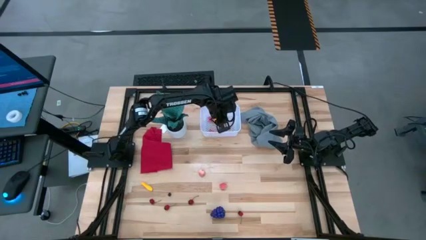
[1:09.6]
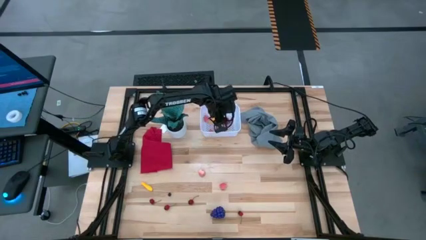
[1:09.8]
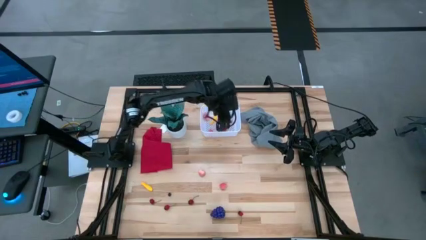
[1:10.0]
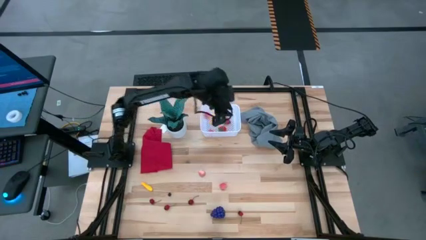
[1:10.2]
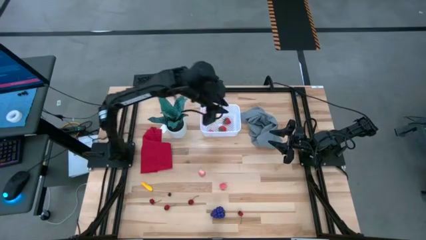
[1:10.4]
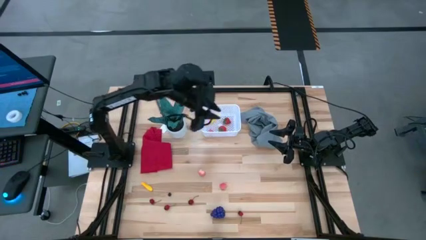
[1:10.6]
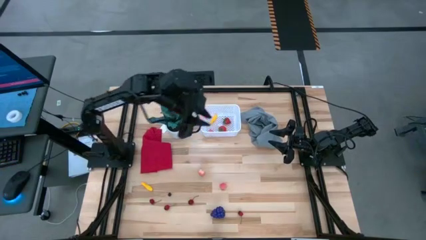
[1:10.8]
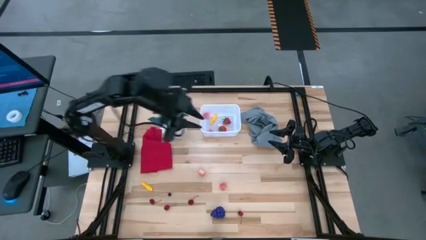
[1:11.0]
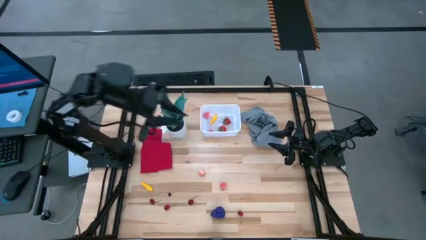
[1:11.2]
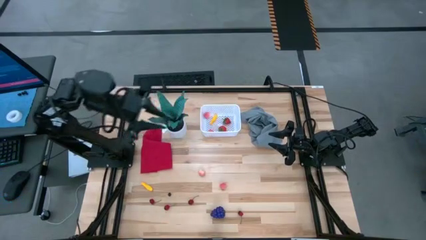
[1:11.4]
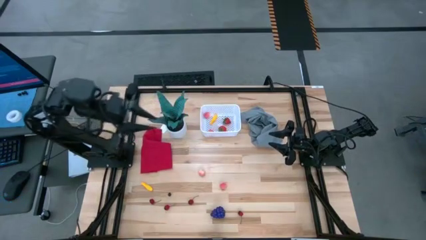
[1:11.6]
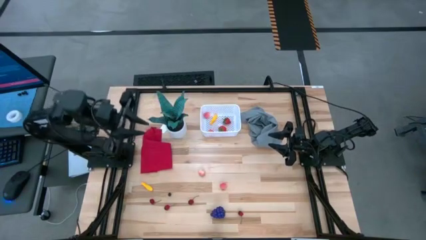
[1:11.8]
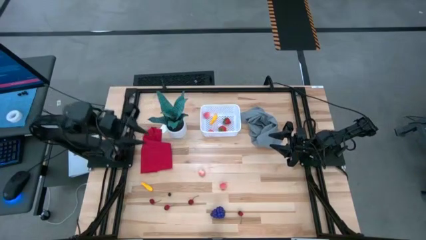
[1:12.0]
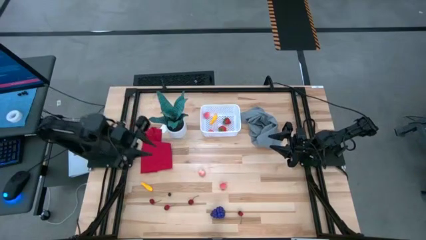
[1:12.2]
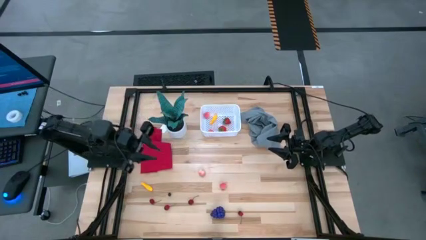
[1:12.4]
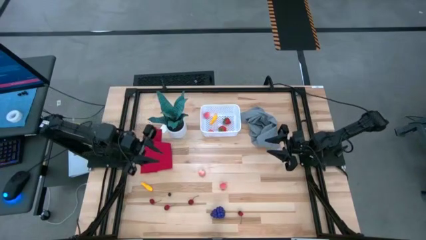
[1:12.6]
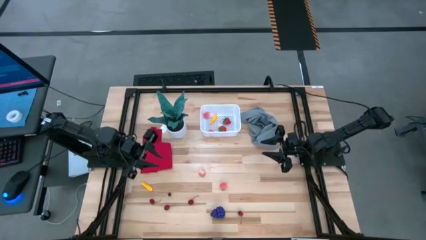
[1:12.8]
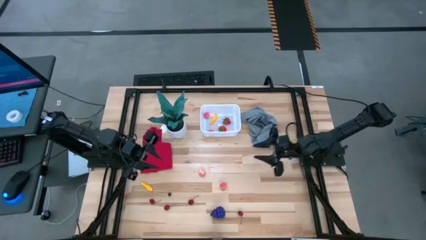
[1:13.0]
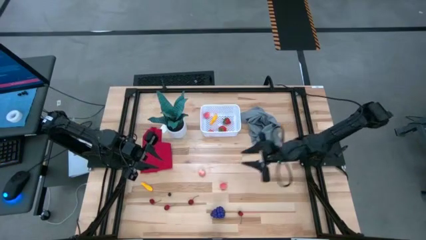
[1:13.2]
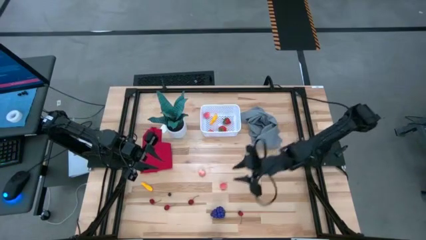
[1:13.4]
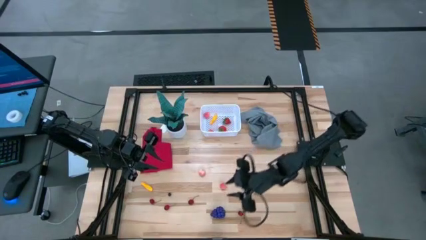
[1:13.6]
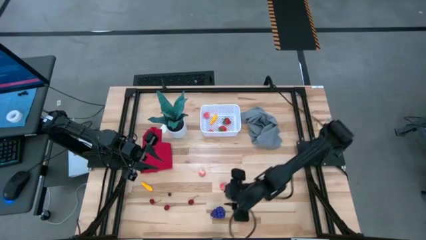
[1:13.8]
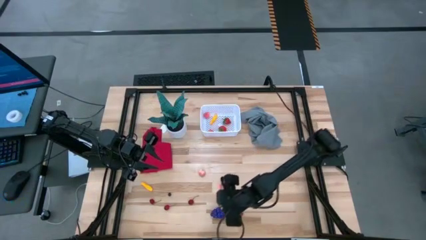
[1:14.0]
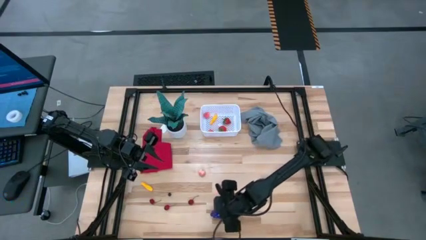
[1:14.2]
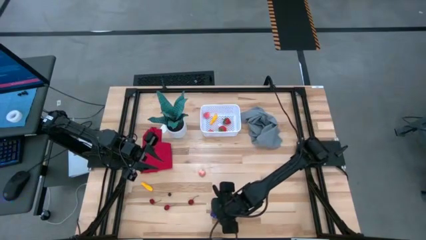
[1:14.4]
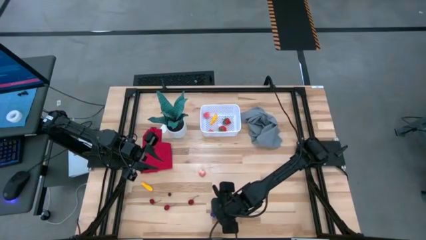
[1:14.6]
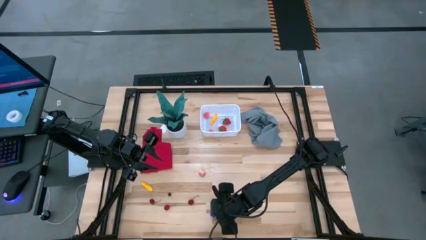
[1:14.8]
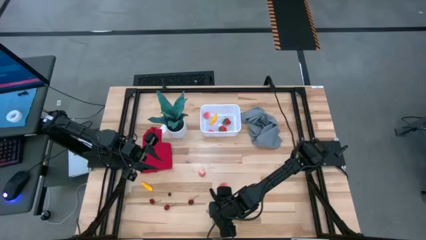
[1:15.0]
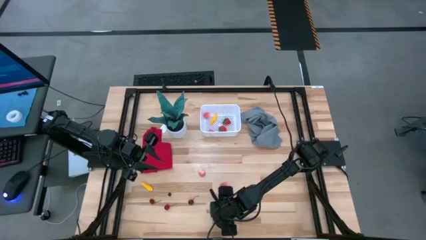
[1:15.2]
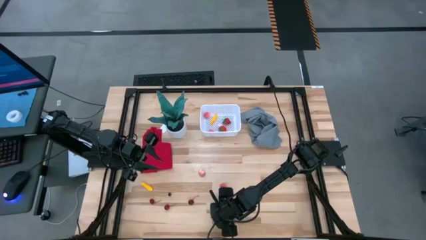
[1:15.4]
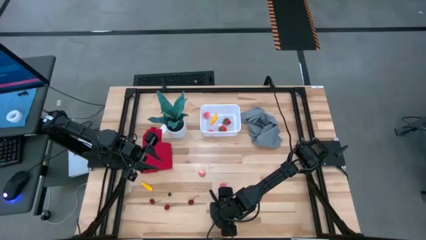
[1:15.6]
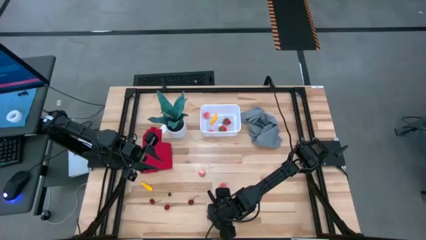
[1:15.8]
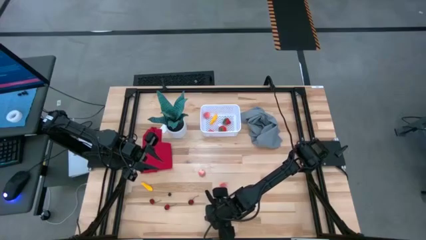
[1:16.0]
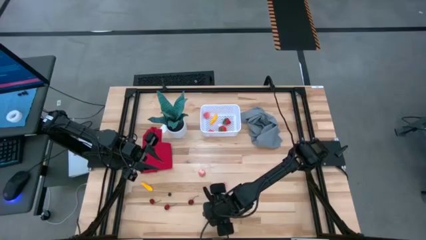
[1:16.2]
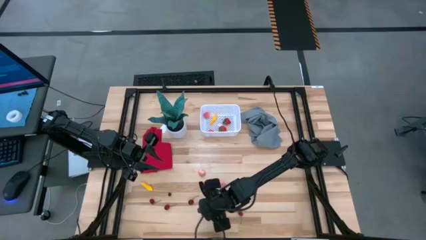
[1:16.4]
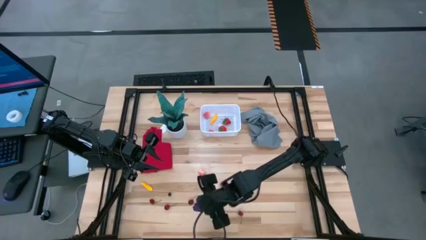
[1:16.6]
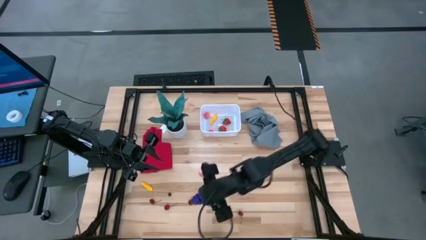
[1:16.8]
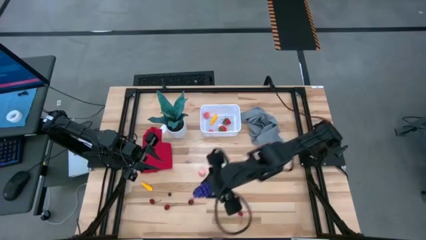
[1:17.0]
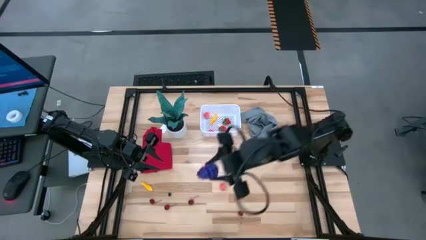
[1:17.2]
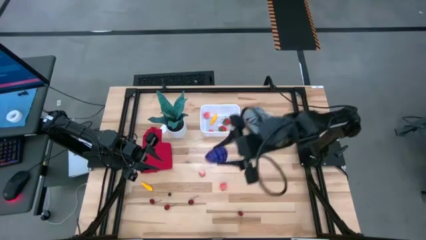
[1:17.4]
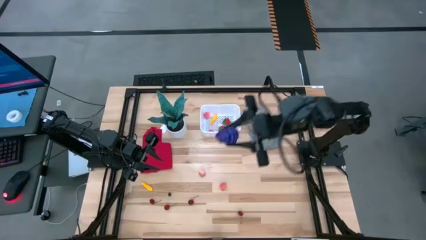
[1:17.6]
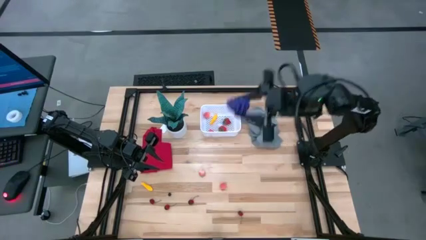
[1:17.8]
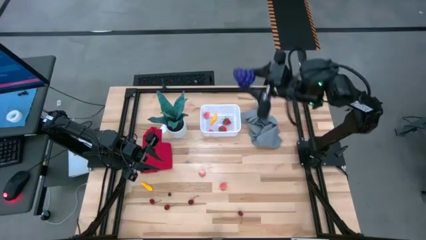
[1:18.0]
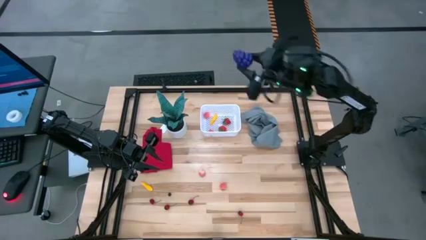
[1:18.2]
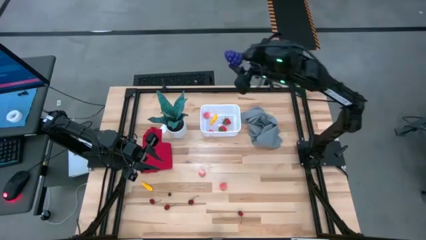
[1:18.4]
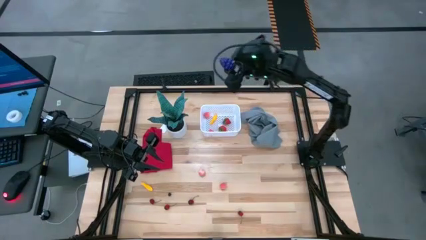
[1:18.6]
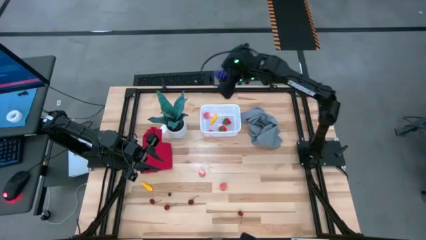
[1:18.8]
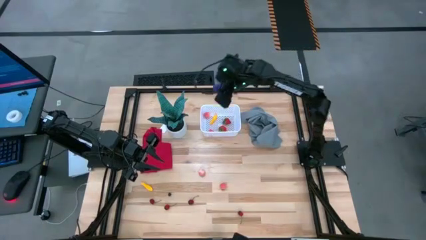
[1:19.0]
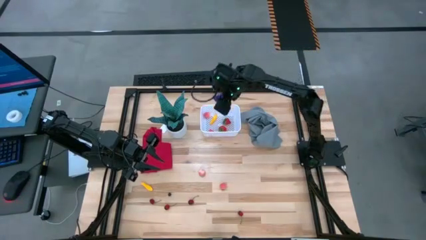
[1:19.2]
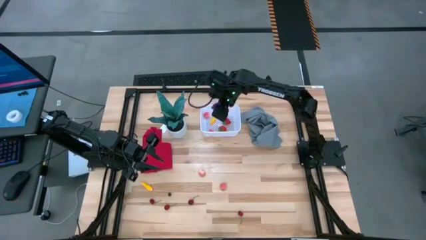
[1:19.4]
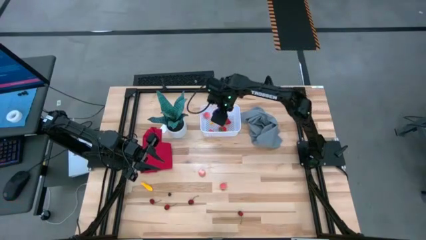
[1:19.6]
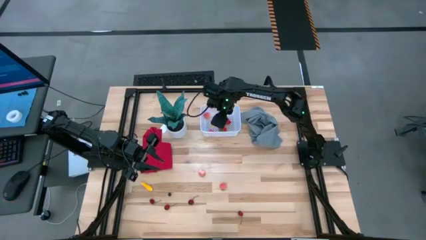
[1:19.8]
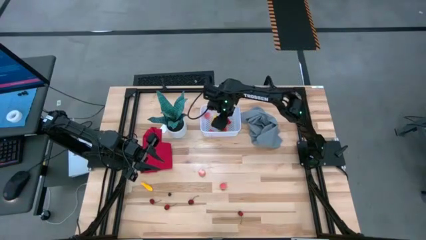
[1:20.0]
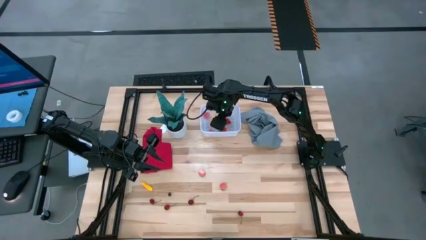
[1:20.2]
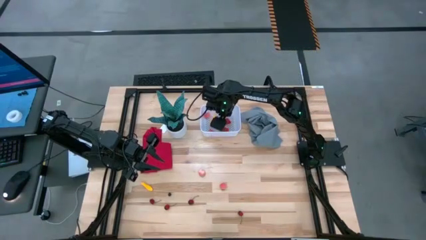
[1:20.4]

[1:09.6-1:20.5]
Task: Pick and placing Produce into tupperware
Put the violet grapes into the white bin

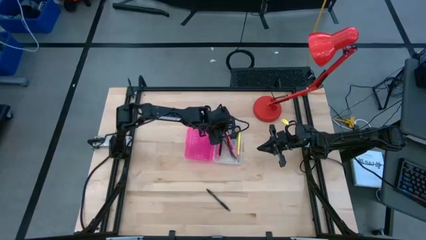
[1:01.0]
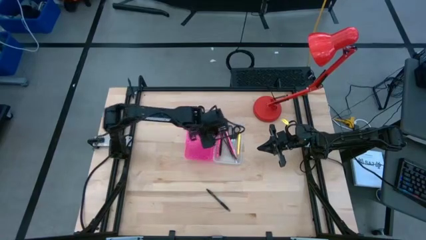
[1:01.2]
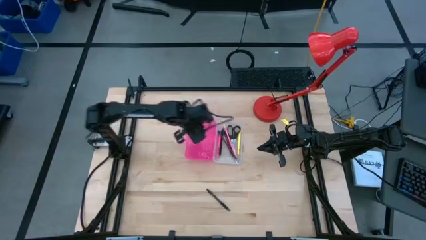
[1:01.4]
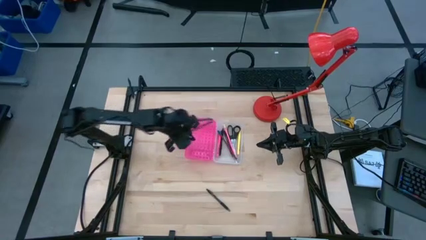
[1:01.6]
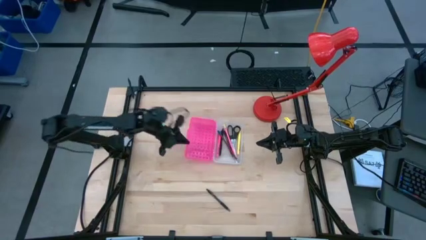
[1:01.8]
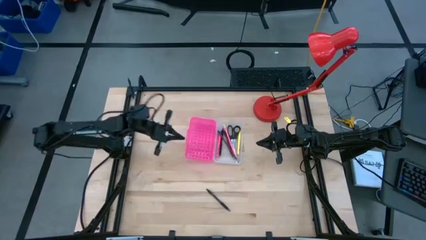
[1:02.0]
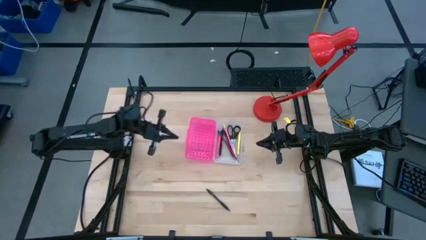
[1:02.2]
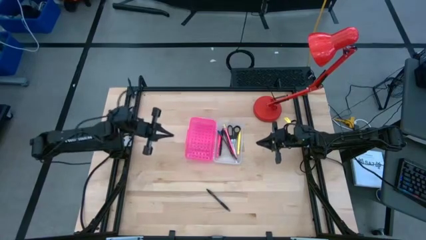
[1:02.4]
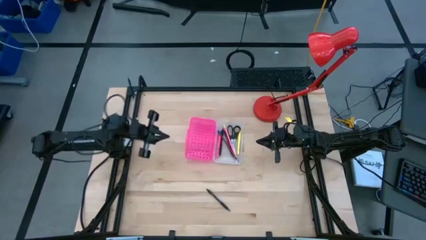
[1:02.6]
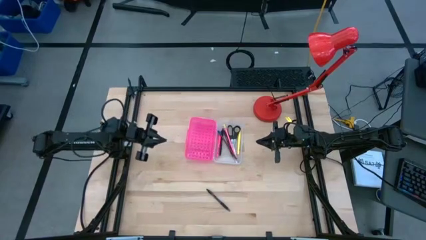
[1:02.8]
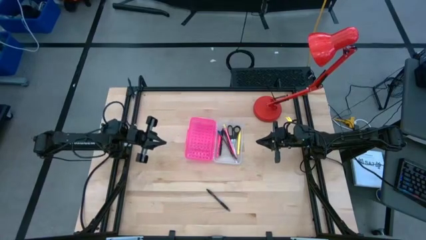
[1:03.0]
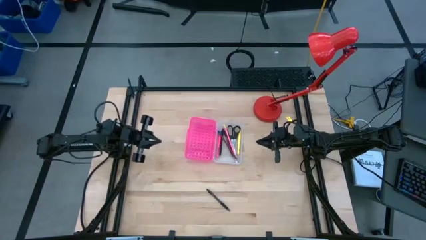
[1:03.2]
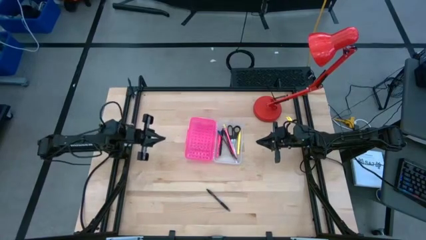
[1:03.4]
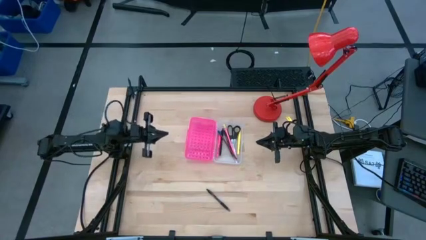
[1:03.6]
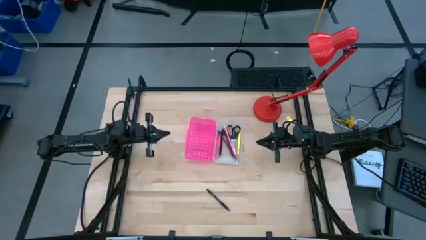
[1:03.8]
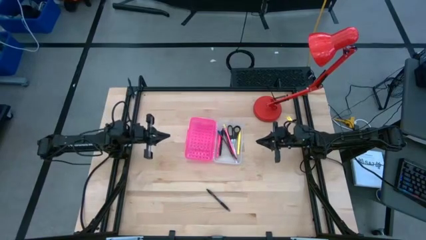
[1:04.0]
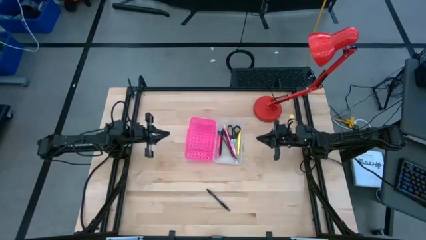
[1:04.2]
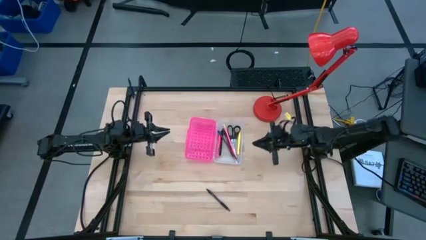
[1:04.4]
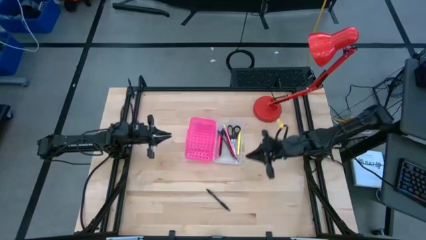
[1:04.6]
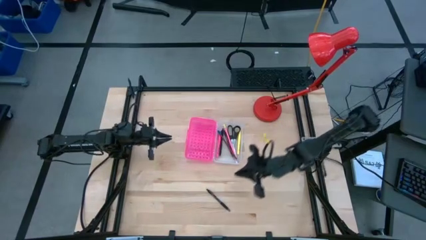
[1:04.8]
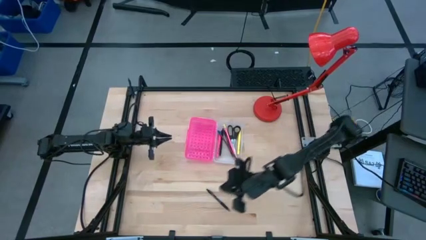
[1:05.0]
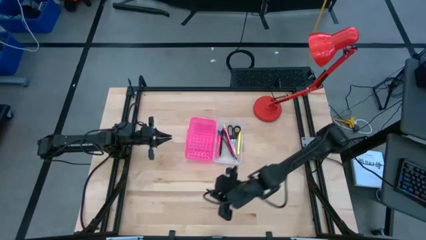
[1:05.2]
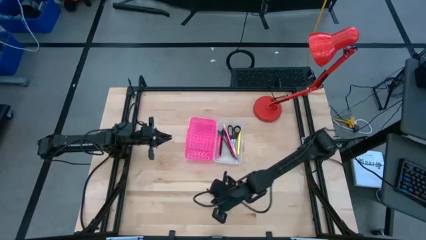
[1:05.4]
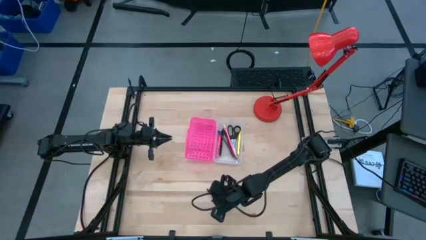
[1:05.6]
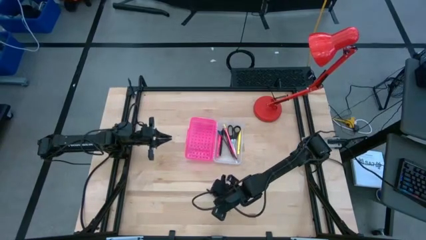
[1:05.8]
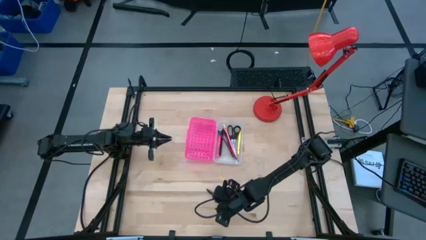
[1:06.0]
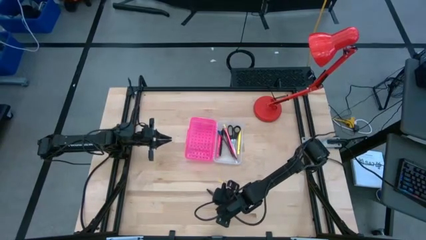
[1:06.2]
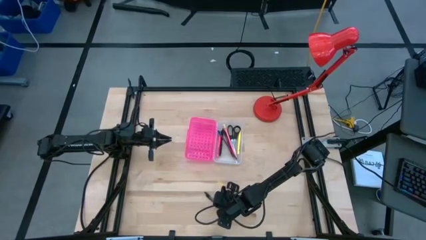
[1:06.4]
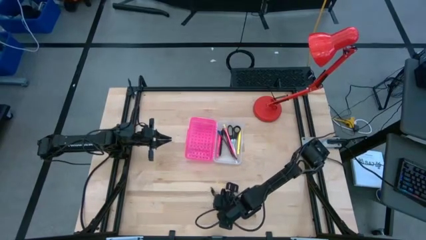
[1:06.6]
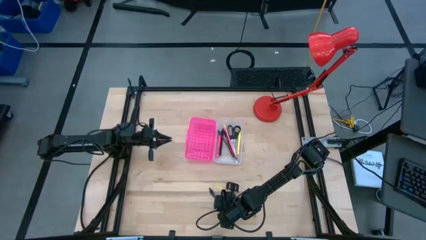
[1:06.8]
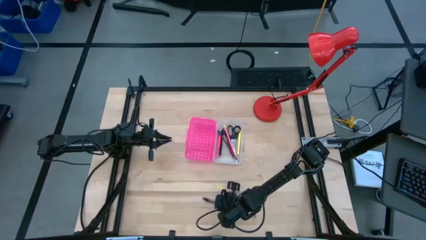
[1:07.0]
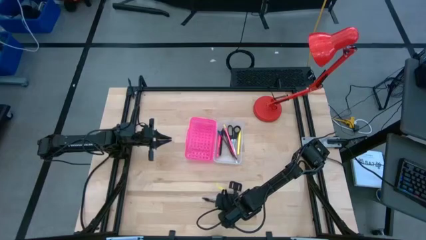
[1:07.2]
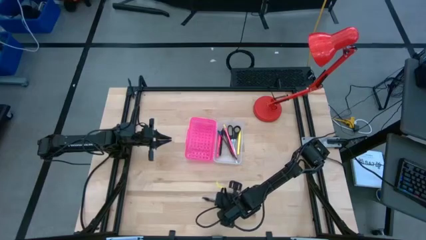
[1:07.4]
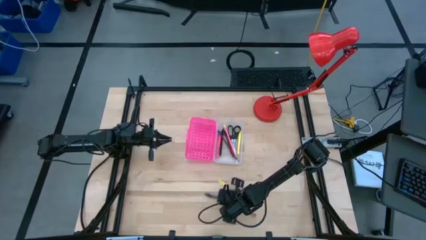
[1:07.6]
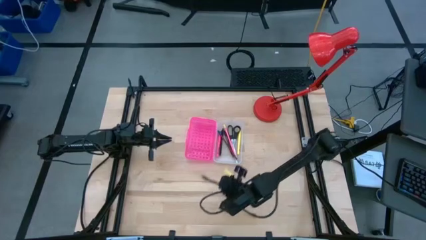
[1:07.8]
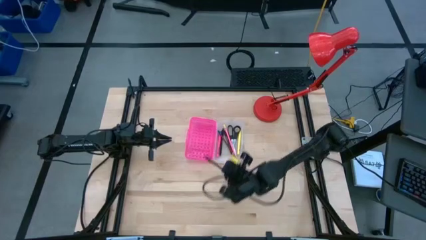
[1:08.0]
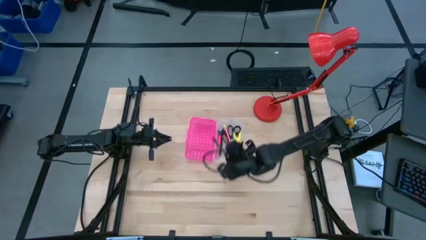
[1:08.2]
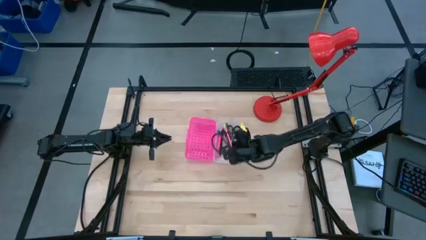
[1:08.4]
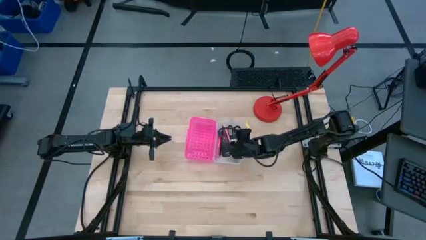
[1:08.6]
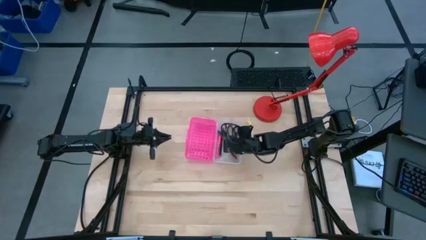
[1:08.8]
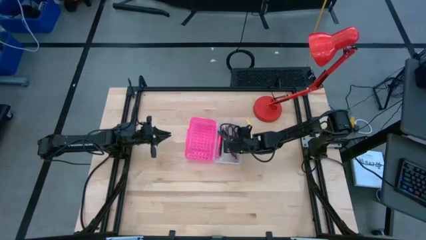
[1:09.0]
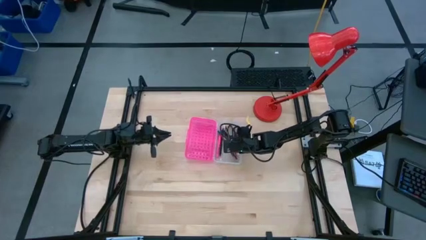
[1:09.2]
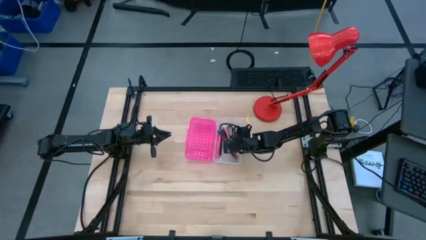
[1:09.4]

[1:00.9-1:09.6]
Task: Pick & place school supplies into a supply box
Put the black pen into the supply box
